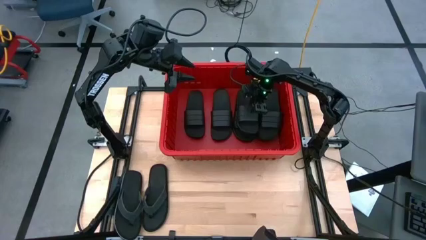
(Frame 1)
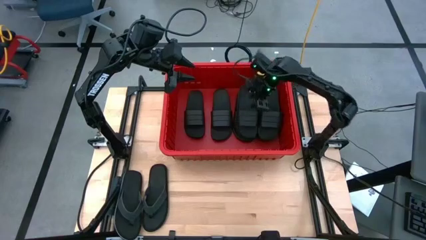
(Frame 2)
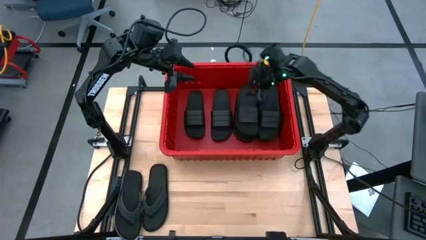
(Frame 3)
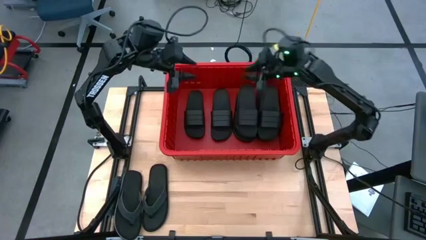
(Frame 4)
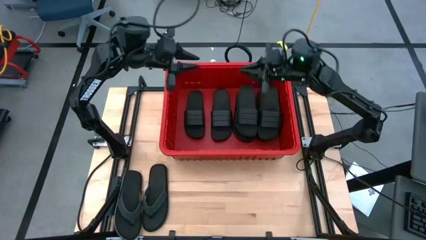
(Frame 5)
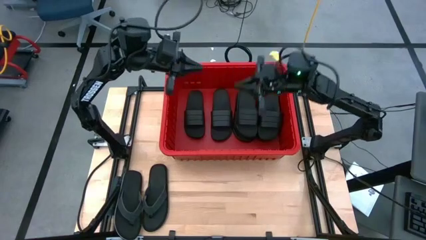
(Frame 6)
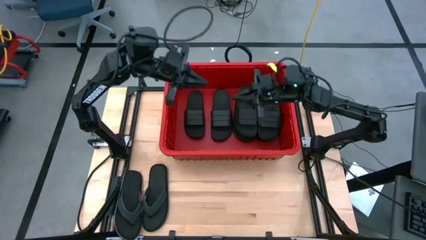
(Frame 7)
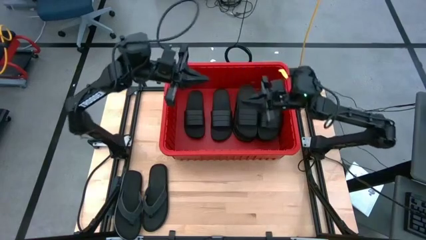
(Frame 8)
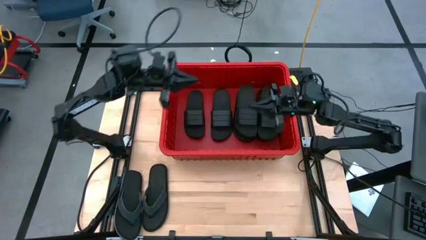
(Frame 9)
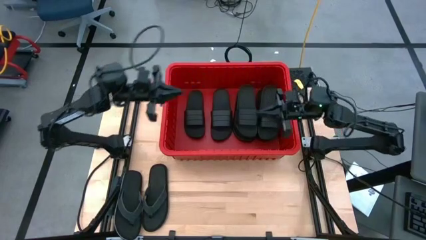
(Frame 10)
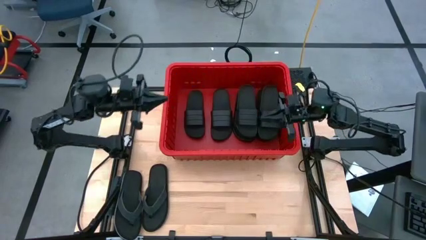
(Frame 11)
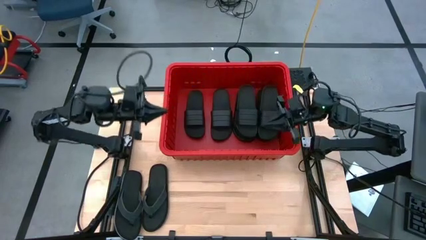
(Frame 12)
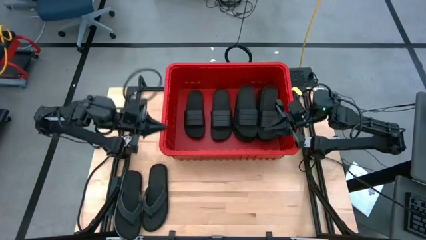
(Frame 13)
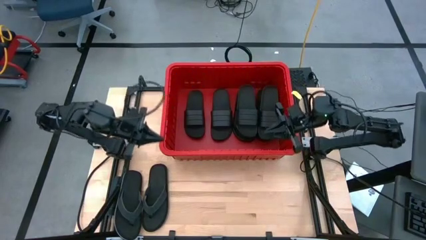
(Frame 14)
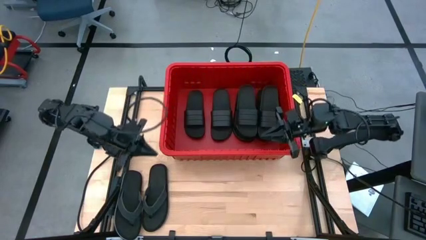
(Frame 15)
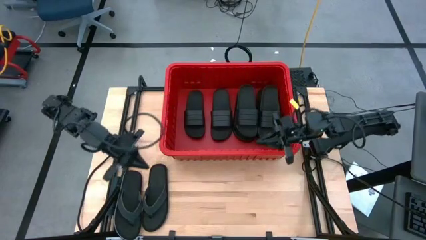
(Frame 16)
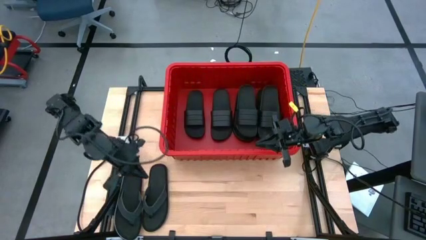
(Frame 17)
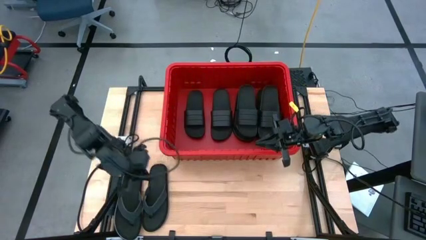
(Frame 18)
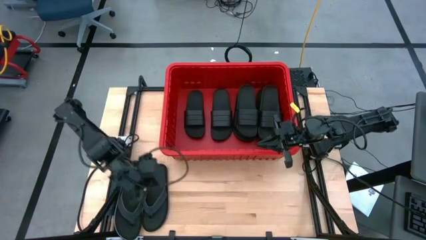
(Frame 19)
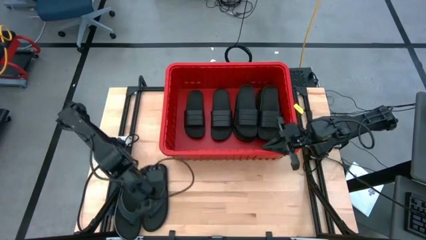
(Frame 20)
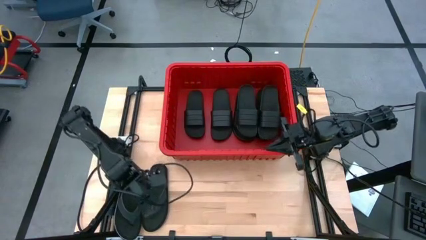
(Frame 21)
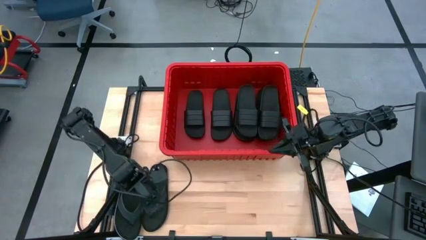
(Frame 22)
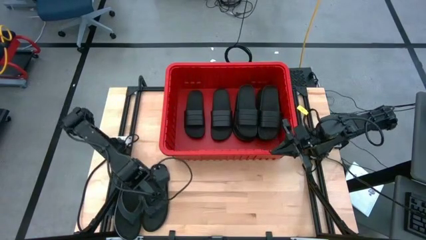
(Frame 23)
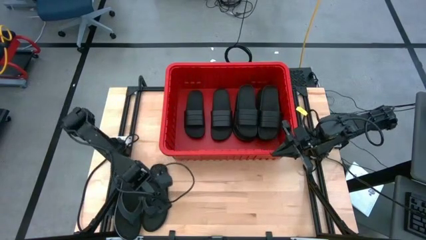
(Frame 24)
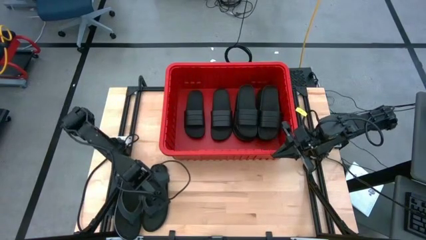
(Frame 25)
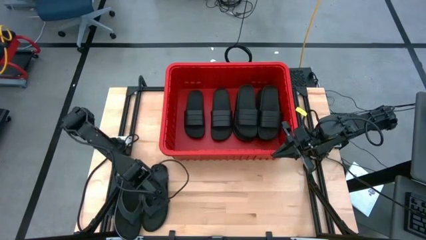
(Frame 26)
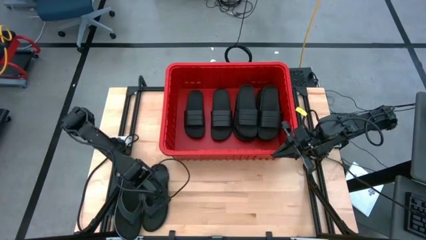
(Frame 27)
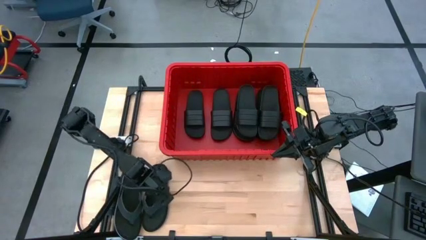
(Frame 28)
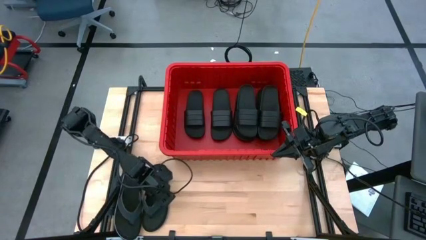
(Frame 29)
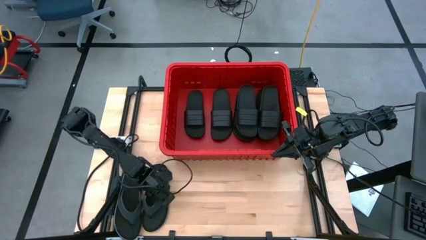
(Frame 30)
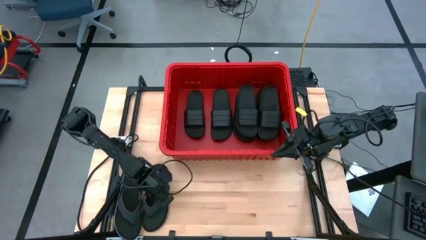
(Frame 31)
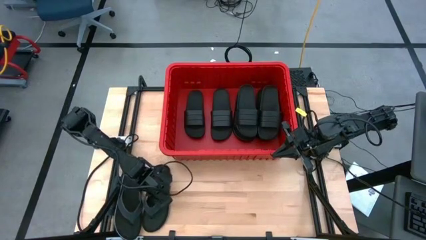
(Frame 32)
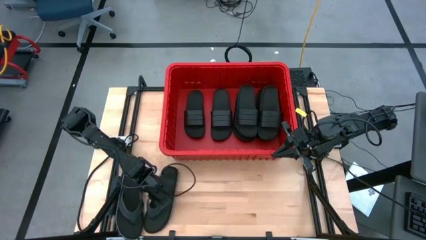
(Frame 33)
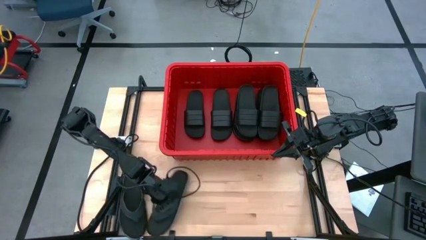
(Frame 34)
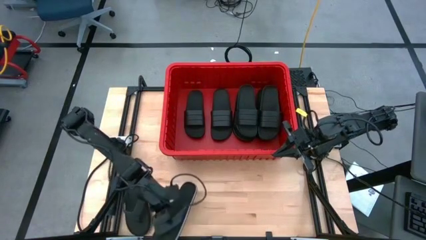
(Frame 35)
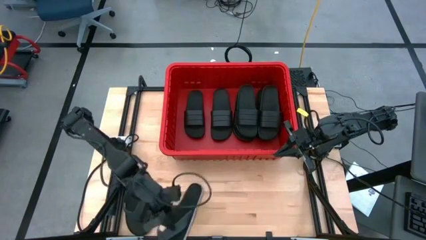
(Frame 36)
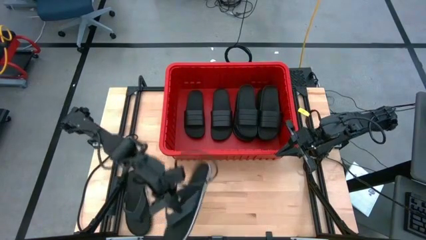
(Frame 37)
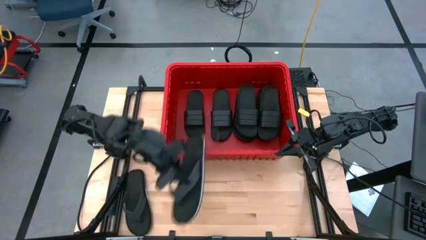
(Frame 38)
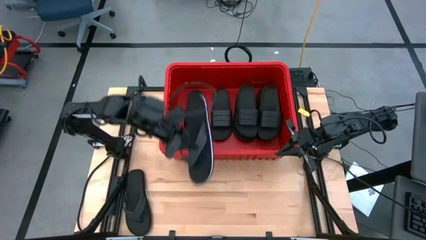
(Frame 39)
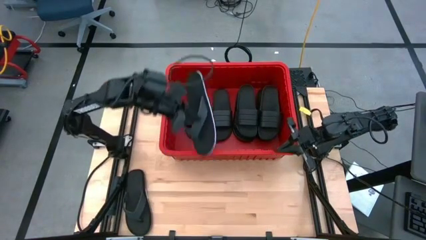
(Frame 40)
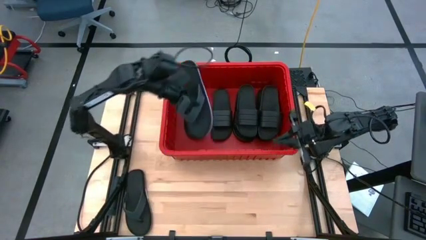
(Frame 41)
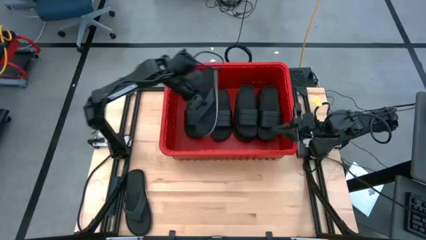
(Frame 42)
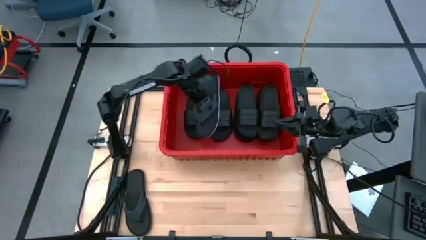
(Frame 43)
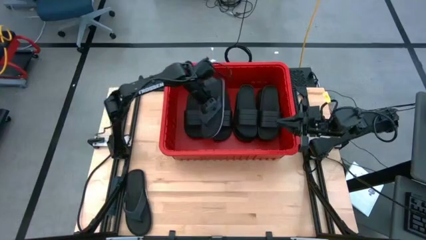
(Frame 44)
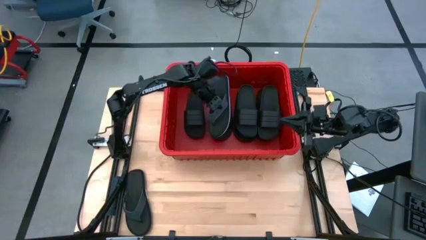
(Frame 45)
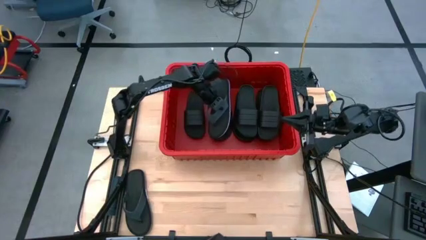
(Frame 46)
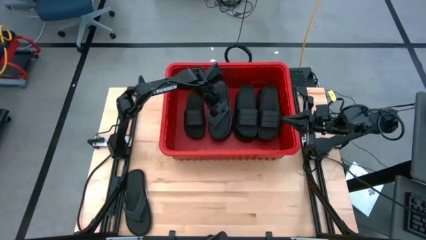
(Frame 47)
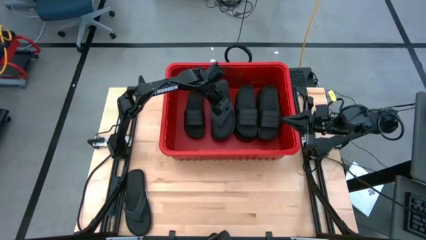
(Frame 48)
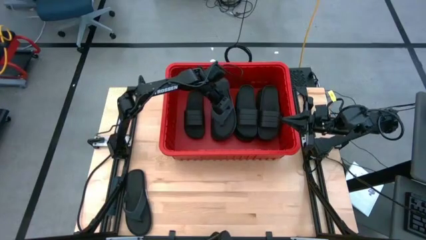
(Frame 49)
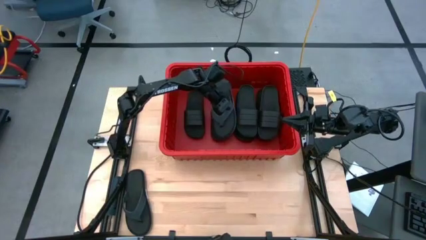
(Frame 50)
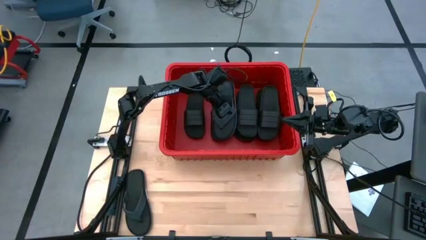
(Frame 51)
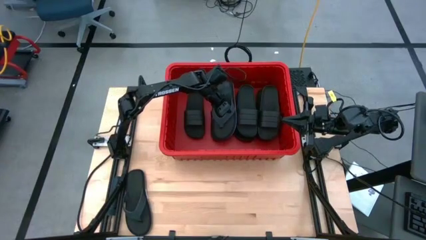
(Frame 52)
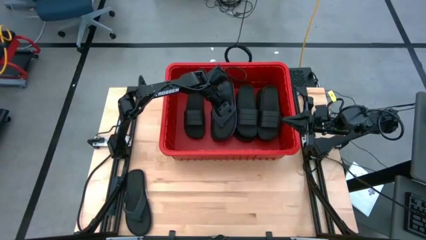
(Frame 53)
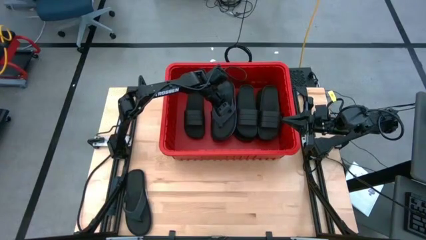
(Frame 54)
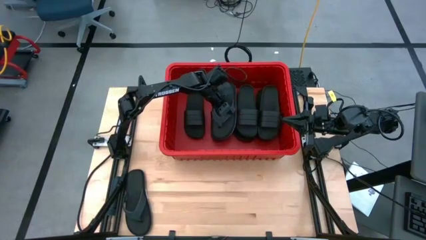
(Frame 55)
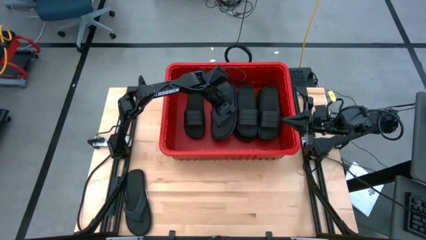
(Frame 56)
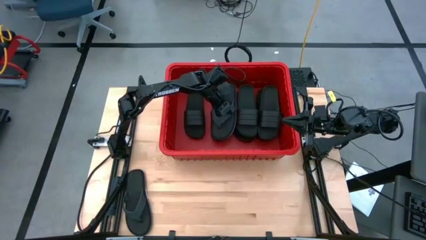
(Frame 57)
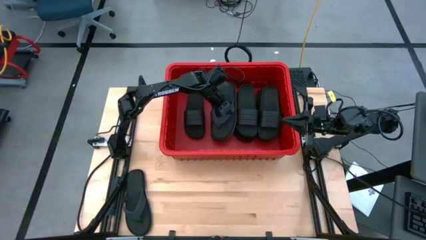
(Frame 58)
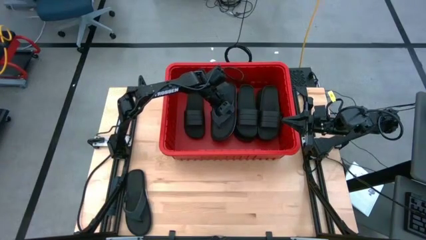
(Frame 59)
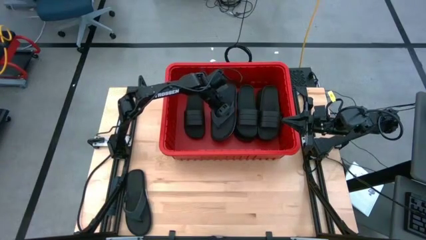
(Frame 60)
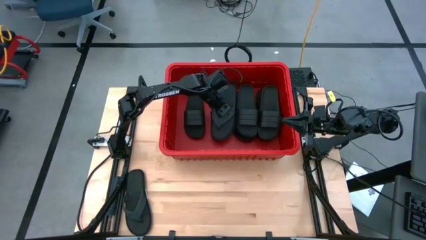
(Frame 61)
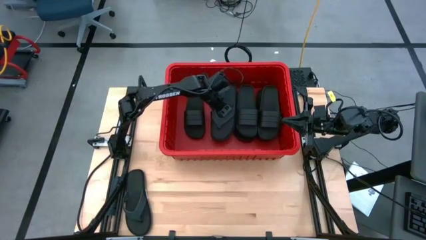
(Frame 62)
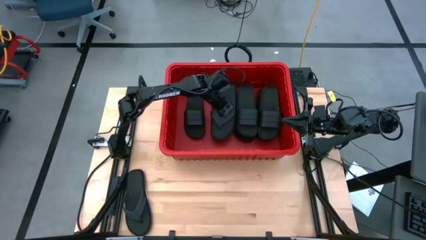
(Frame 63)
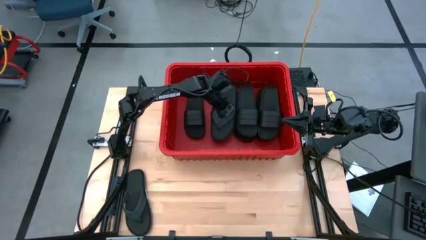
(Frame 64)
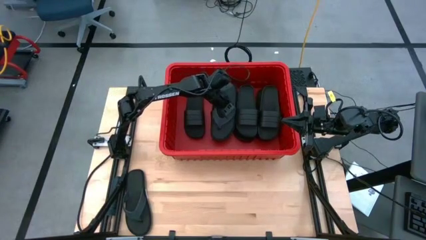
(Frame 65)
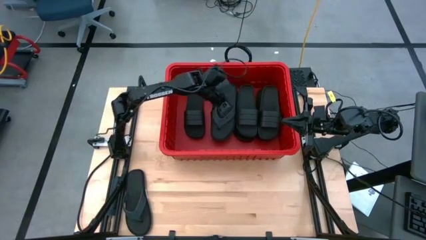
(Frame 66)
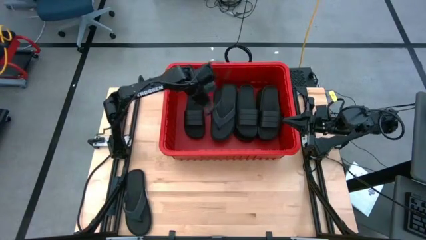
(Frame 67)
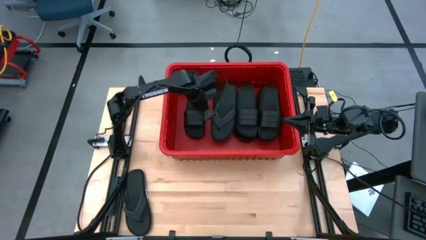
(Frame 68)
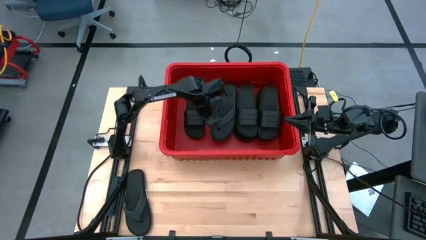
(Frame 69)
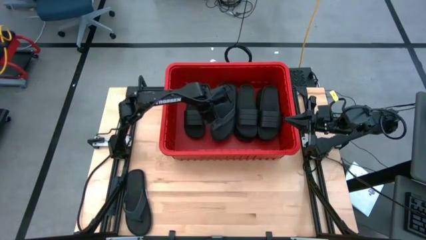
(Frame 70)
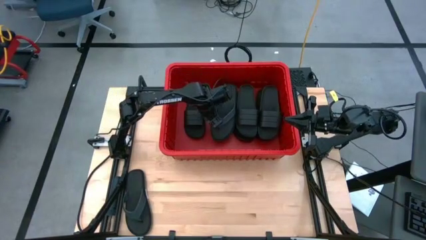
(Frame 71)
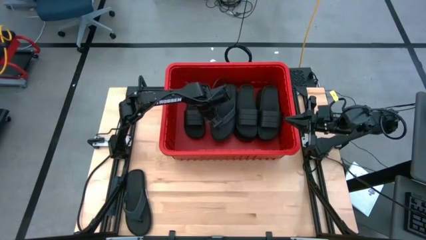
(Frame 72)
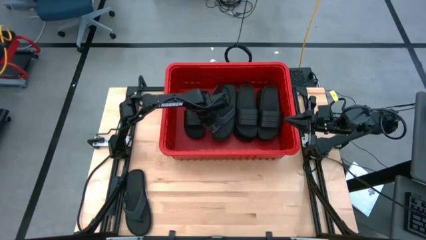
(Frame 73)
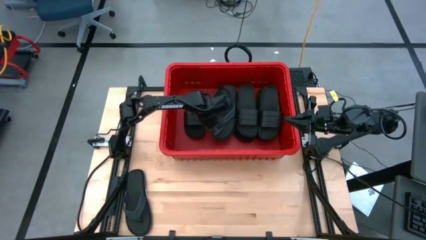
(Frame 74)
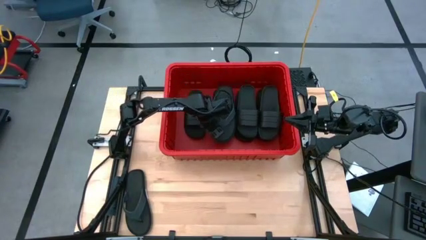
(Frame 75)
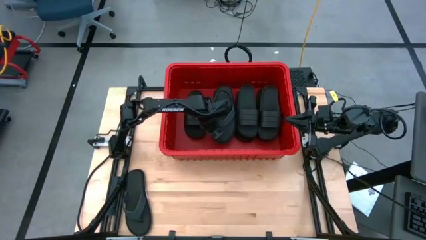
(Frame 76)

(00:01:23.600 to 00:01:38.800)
Task: Pick and place slides into bin
Put the black slipper into the red bin
